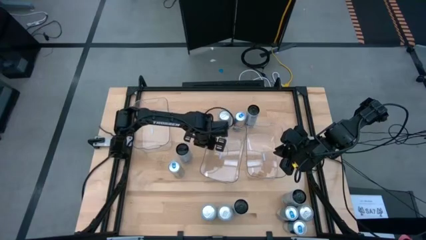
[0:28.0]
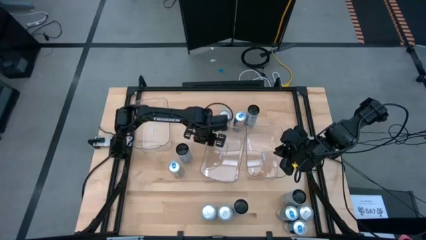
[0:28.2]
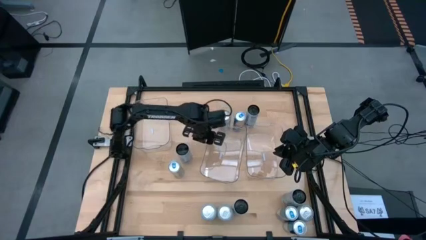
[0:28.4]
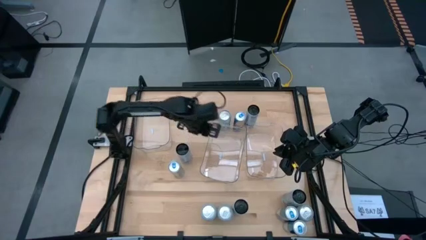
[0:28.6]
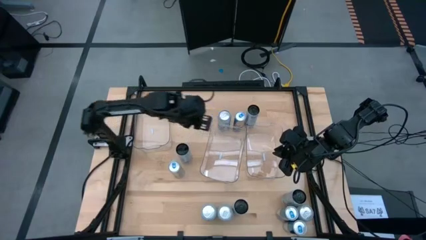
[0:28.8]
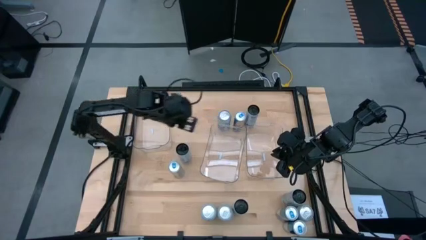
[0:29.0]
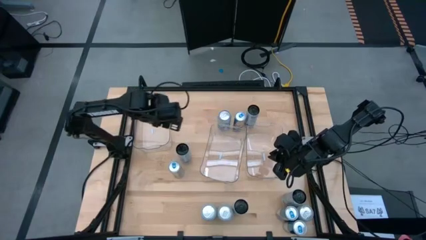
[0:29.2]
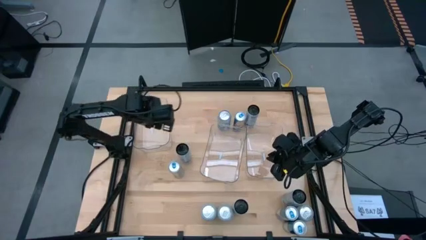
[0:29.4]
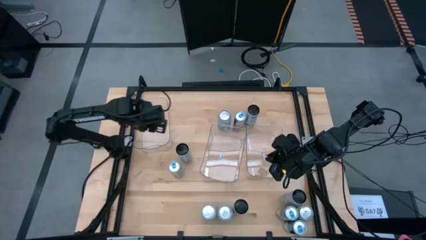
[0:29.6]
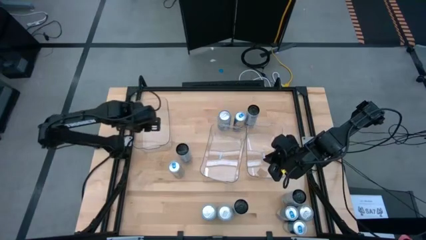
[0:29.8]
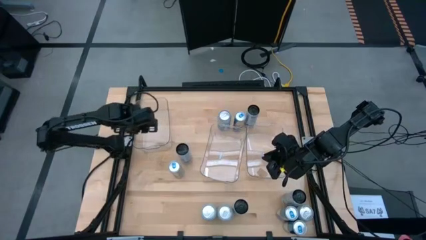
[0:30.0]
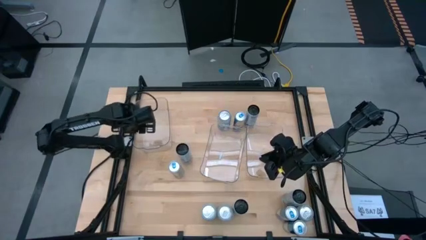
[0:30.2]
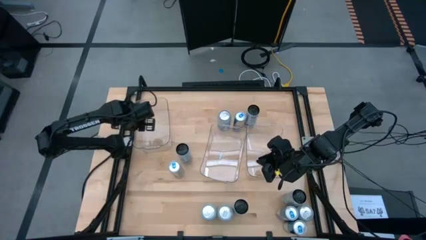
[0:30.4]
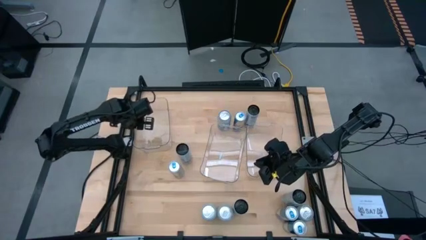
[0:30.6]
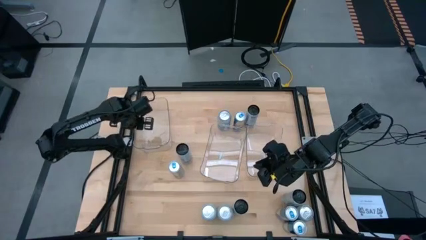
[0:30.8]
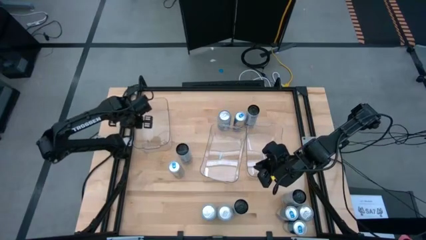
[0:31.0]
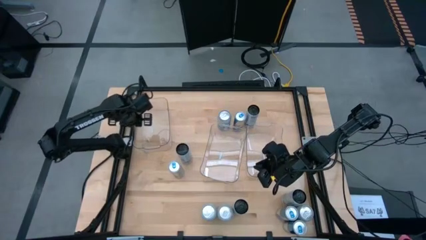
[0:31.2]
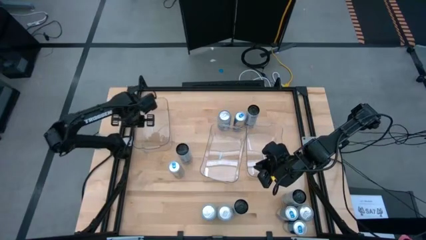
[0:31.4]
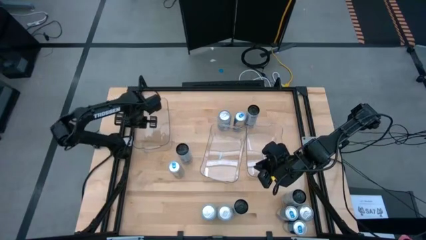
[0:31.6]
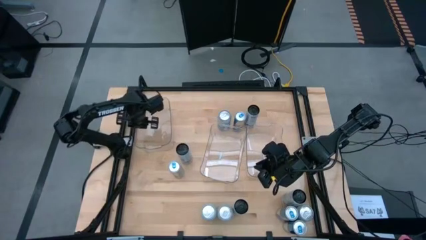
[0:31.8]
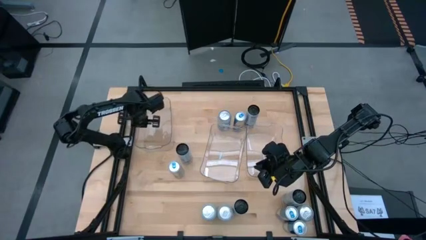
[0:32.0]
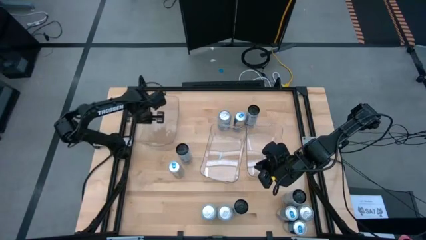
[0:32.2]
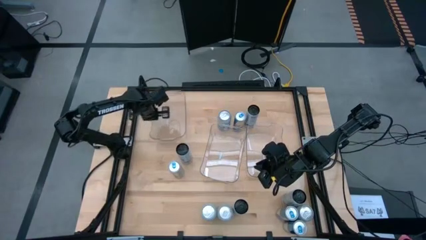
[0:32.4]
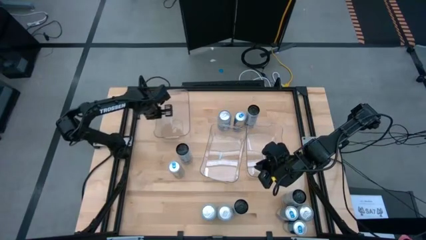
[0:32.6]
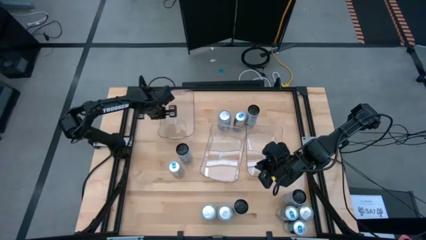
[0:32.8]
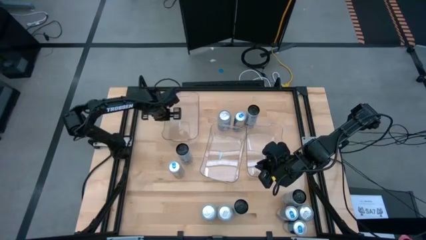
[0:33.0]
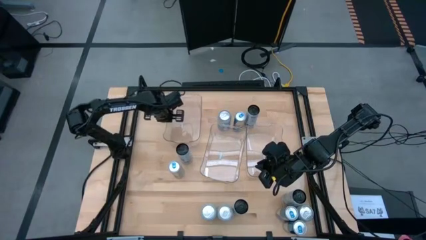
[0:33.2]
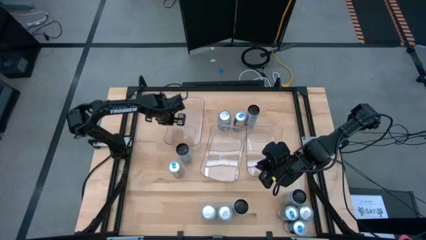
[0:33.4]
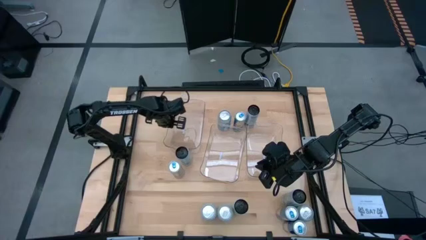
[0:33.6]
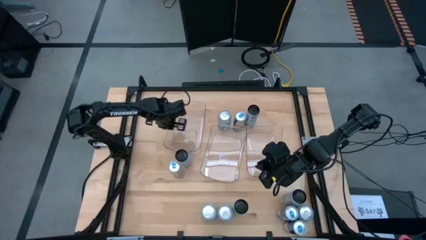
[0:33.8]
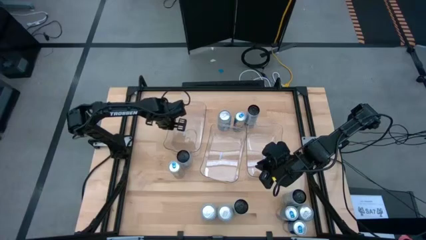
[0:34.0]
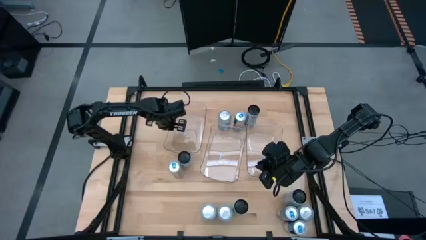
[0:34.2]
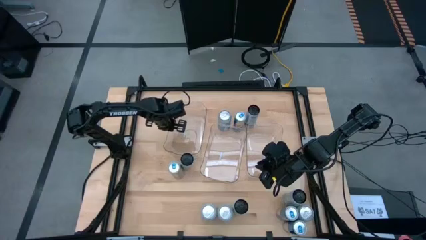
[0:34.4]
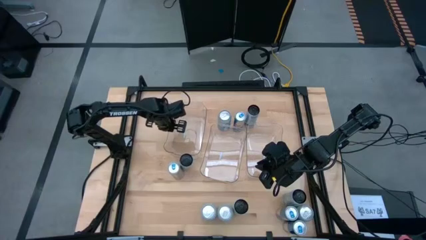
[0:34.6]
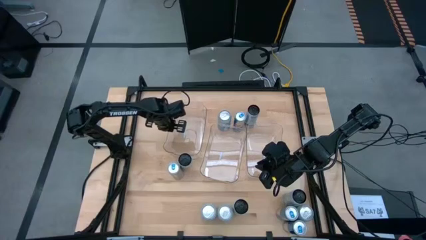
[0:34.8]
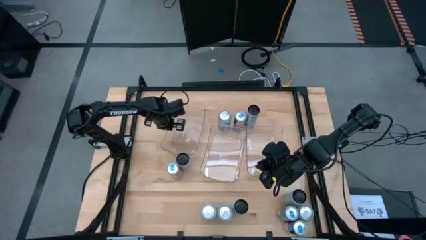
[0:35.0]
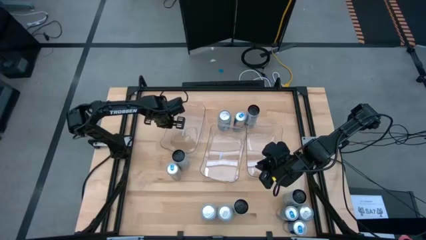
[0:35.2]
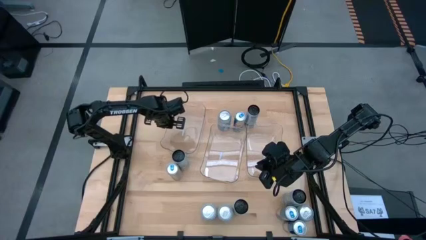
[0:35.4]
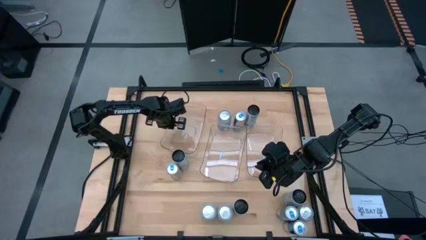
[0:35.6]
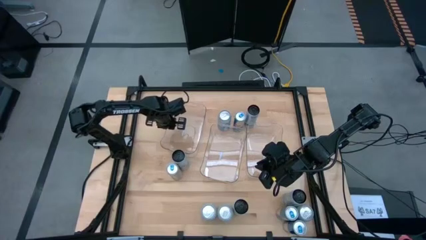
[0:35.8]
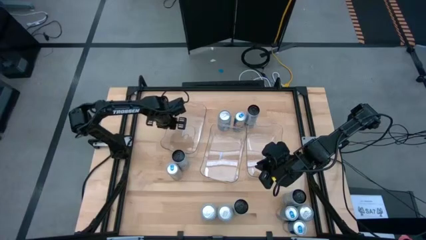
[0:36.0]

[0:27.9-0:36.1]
Task: Sort soda cans
Move the right transparent bin to the center of the table

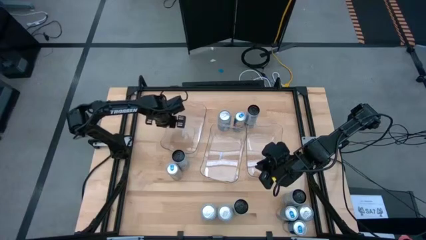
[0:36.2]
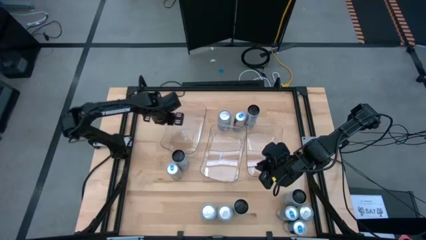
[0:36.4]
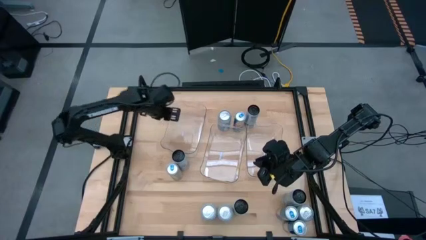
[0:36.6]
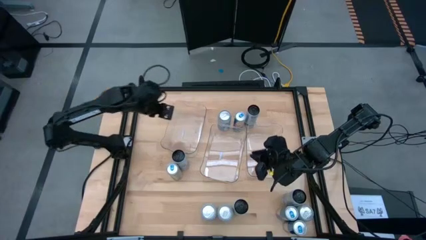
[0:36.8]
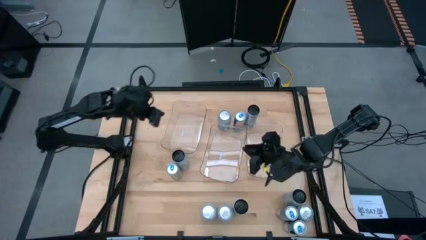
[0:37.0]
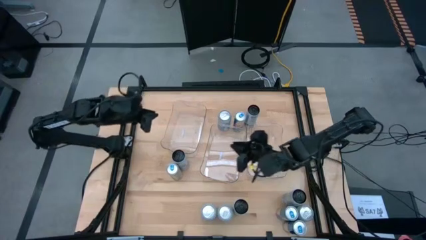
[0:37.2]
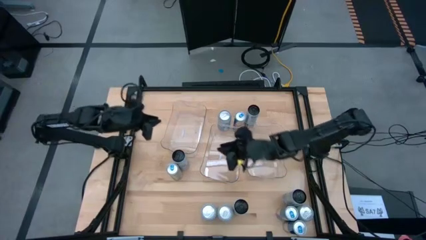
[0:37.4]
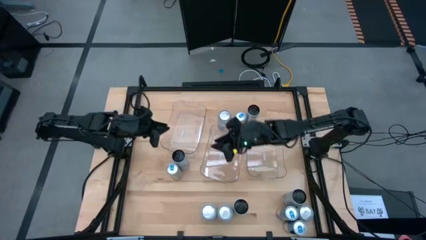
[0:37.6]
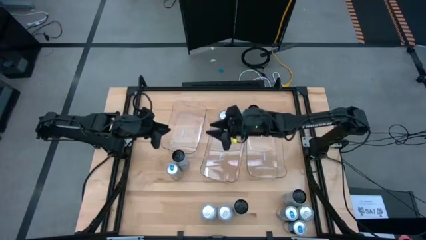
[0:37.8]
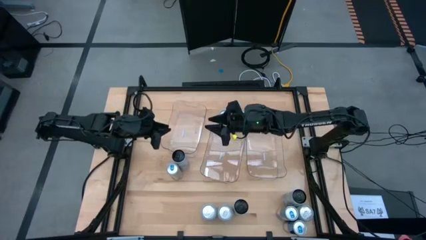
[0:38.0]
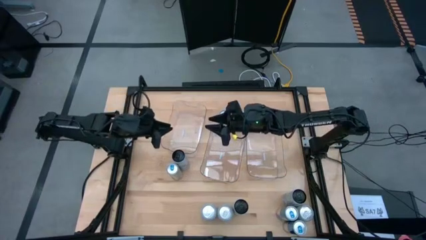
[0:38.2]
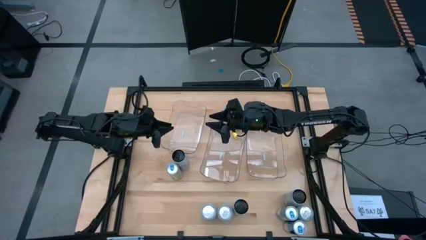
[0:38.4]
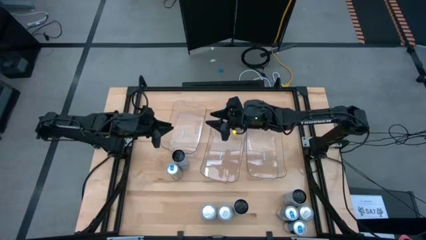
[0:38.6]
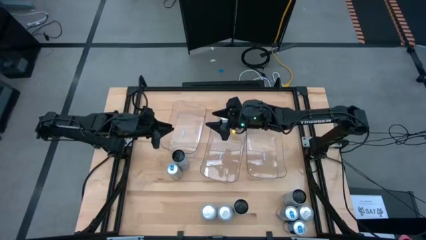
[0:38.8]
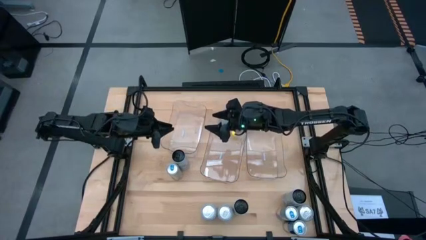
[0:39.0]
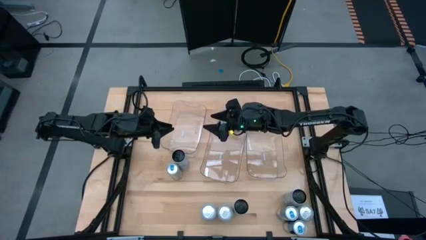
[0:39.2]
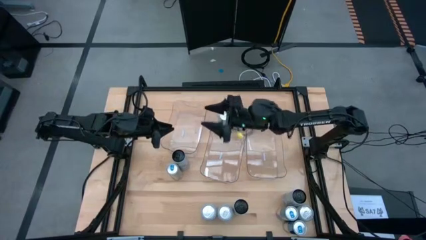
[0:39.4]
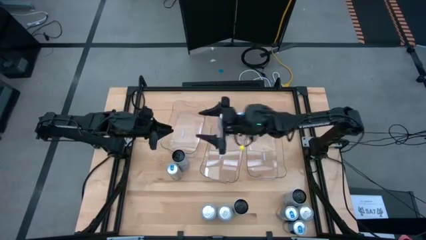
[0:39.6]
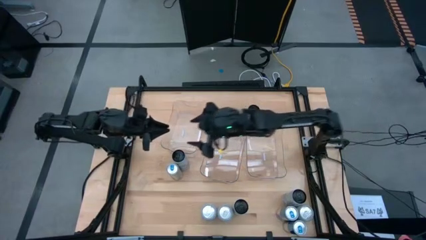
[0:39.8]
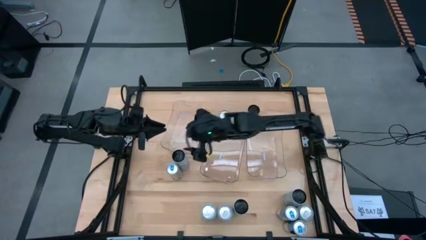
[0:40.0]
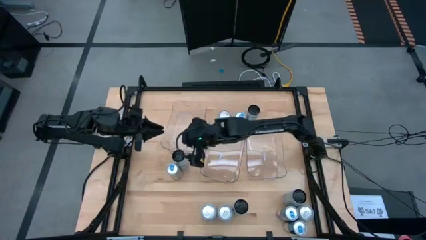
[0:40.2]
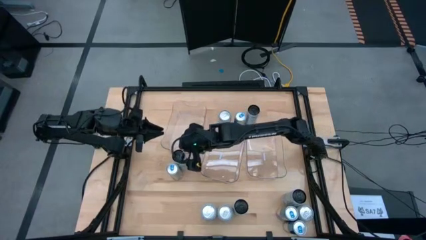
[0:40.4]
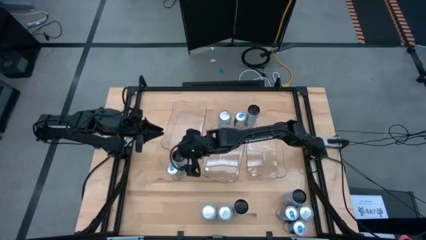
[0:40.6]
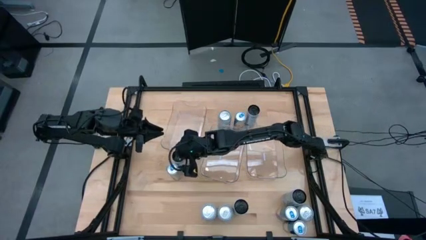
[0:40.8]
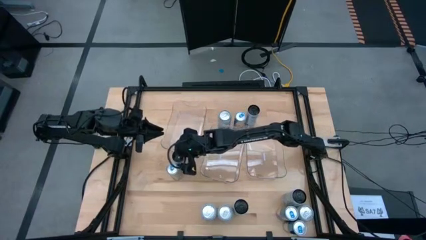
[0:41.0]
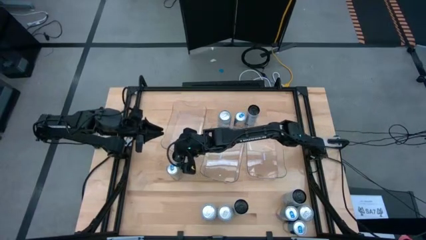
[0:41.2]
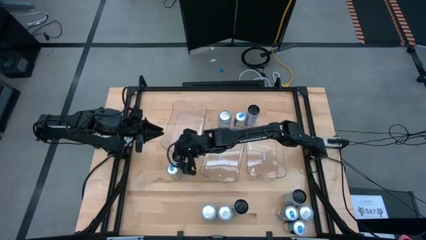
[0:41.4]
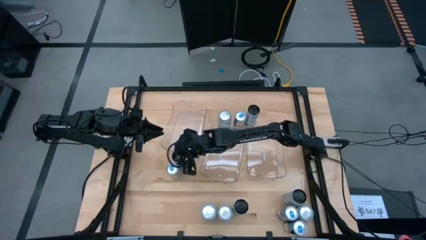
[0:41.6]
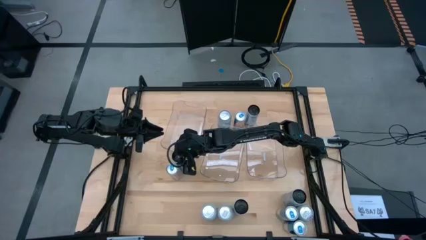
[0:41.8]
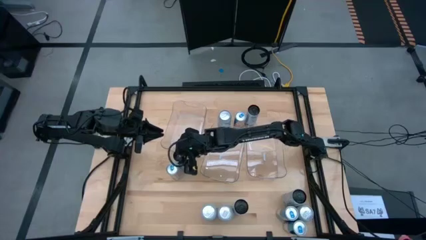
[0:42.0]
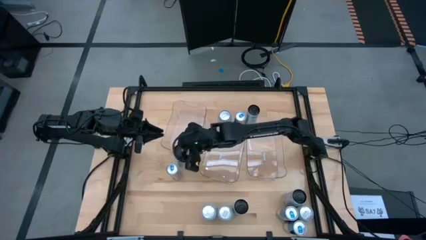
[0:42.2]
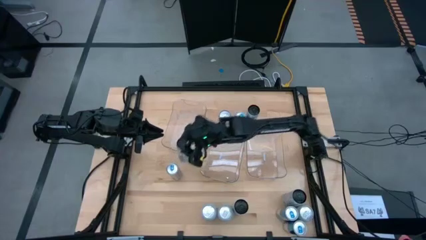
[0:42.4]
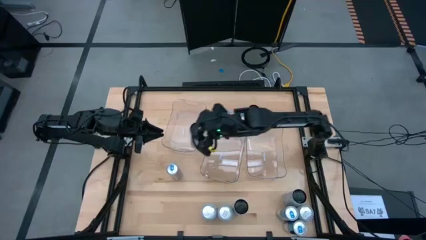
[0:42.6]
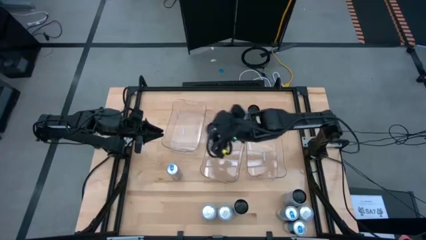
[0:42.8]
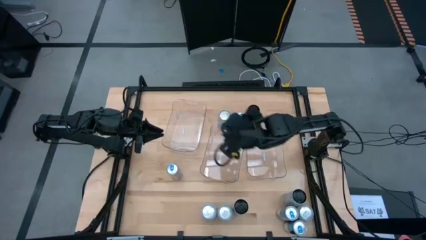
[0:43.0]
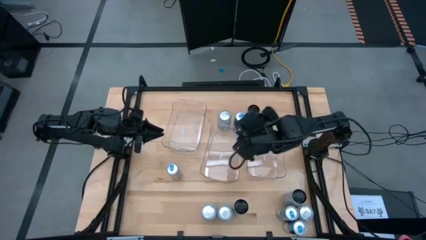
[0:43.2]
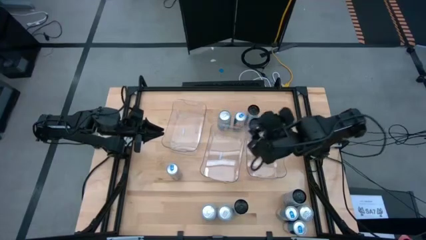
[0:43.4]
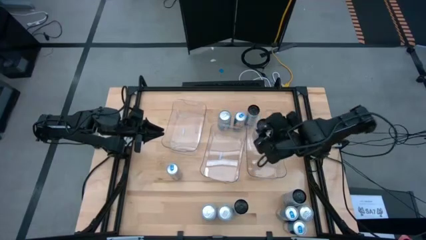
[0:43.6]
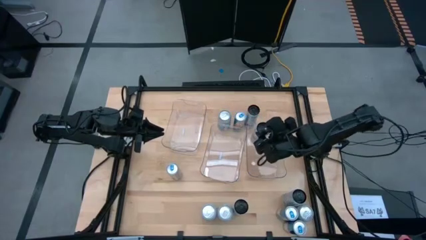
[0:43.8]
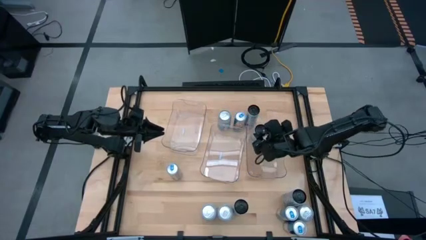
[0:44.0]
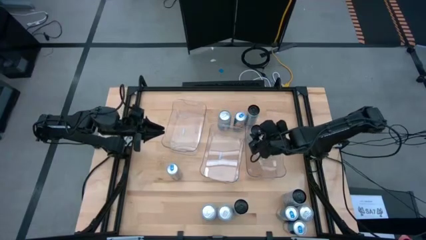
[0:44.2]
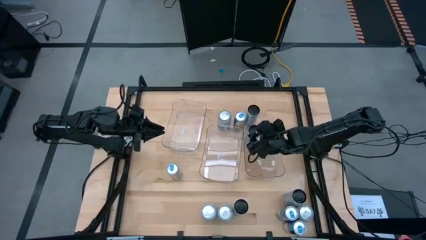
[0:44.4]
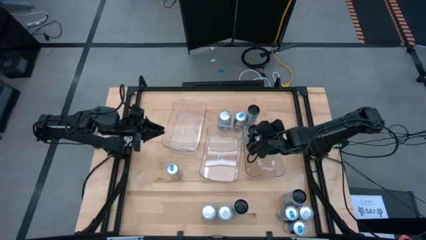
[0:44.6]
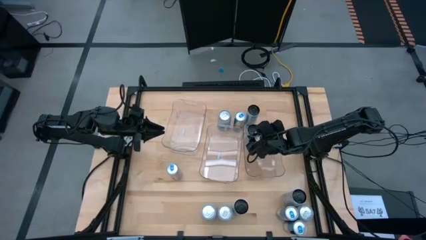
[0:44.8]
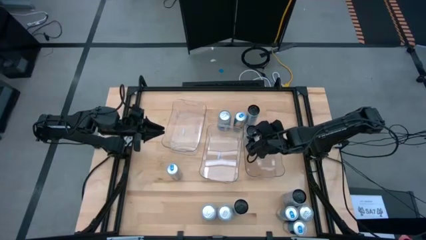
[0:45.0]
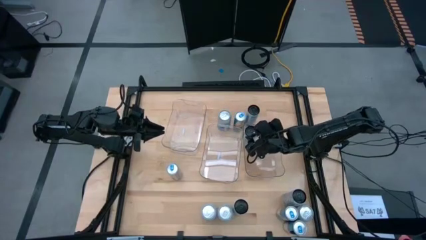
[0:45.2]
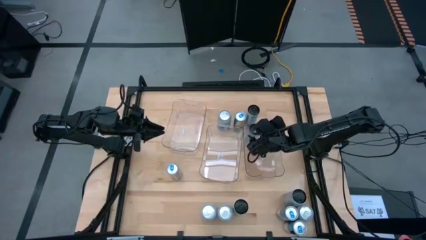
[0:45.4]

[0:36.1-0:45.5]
Put the middle left white soda can into the right transparent bin
